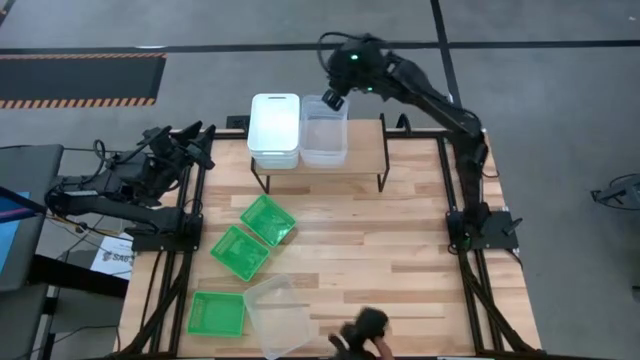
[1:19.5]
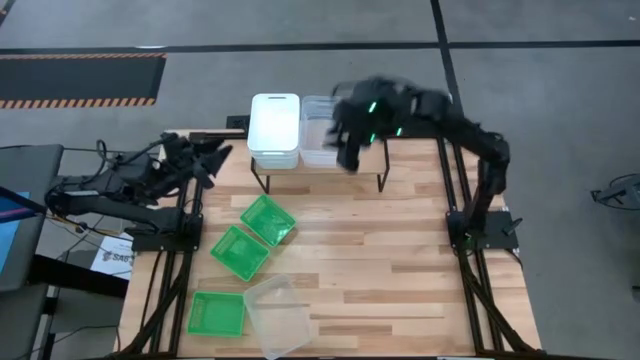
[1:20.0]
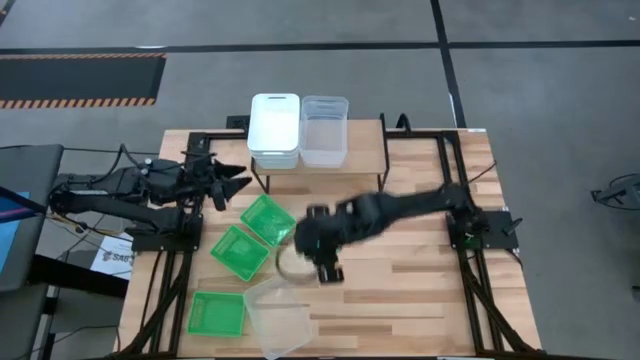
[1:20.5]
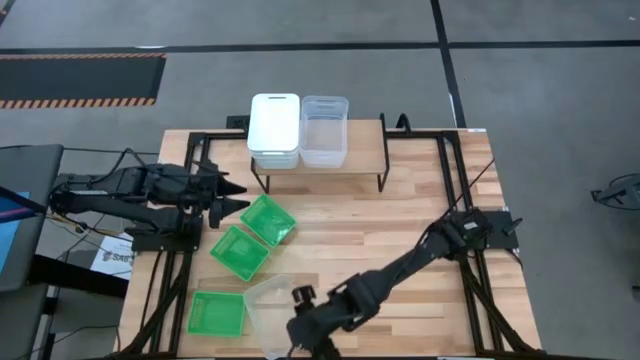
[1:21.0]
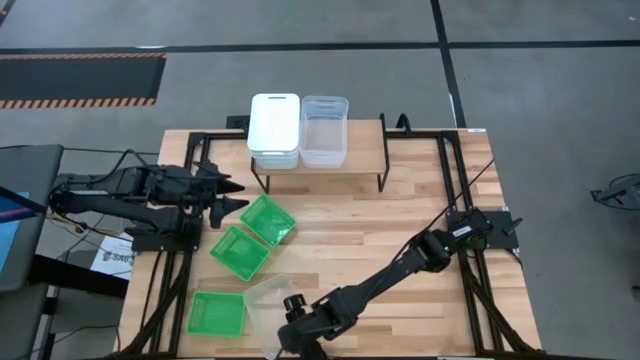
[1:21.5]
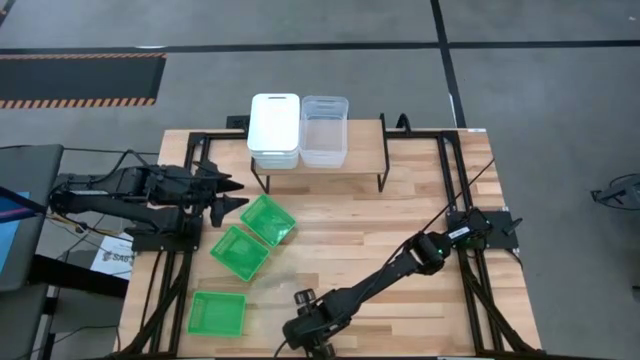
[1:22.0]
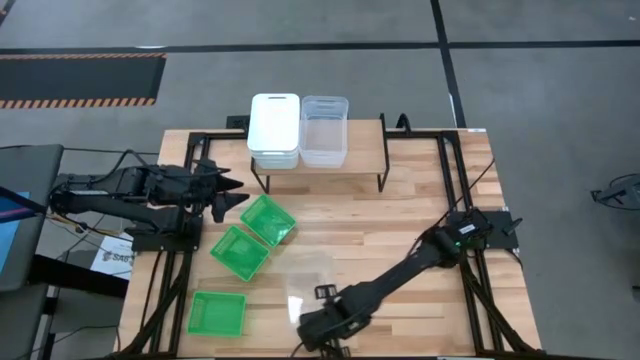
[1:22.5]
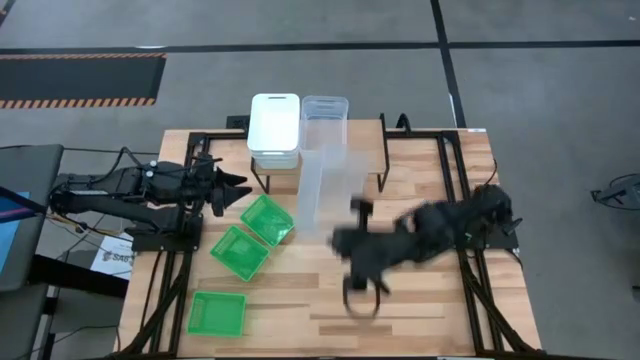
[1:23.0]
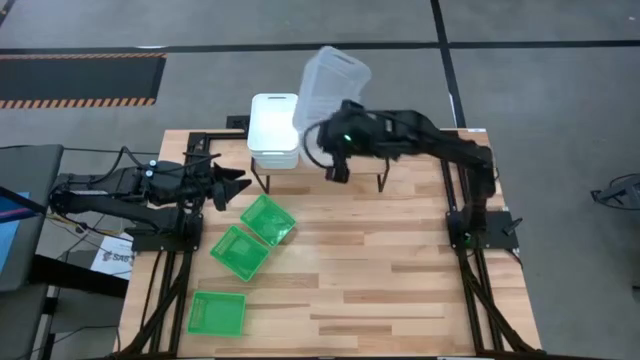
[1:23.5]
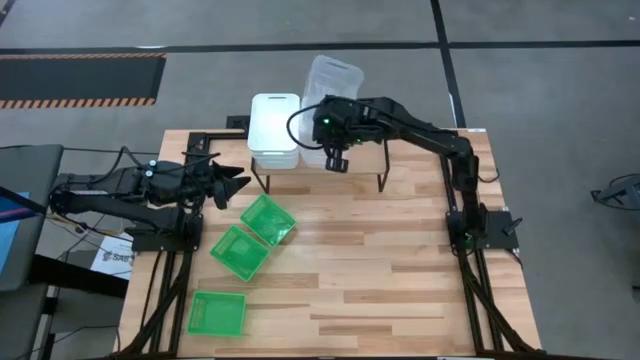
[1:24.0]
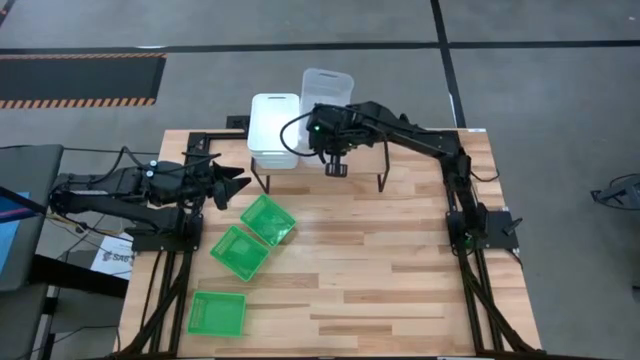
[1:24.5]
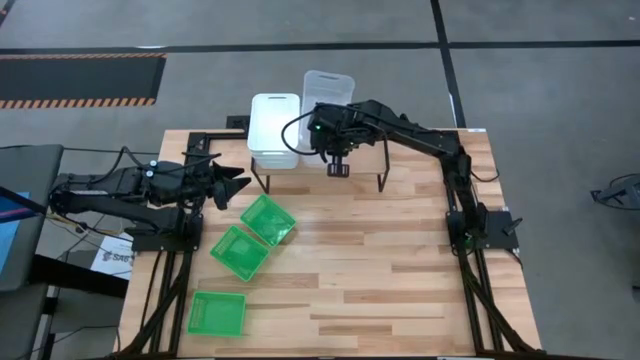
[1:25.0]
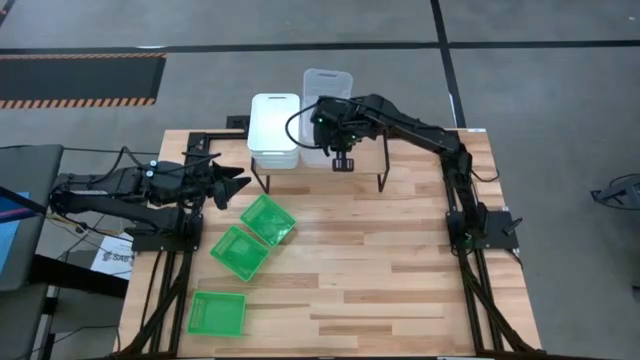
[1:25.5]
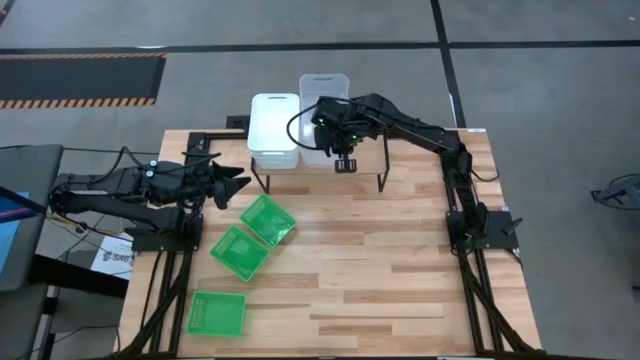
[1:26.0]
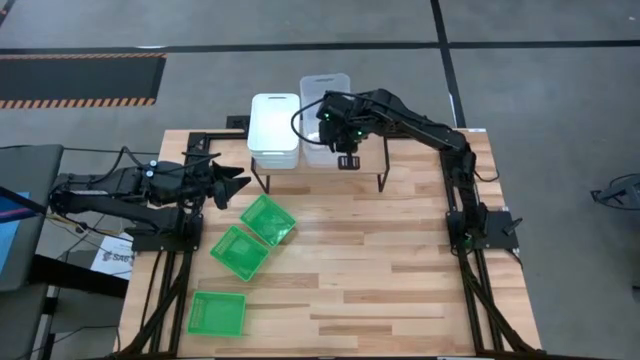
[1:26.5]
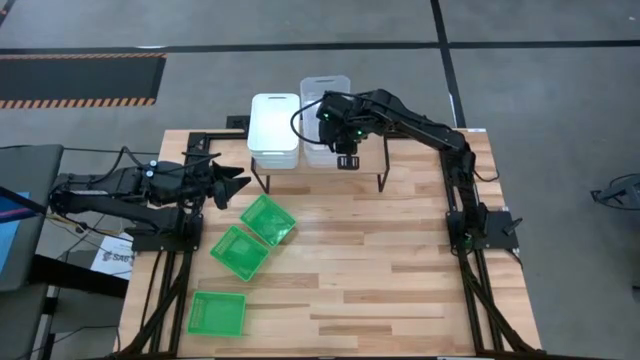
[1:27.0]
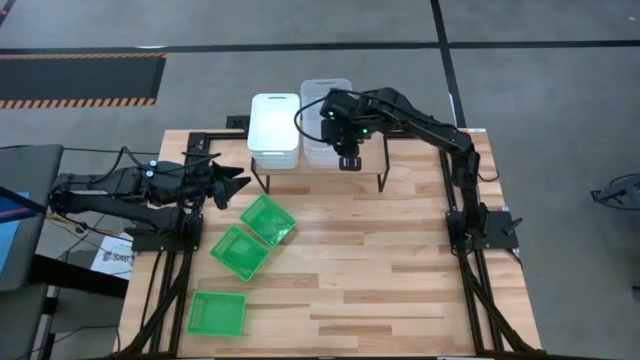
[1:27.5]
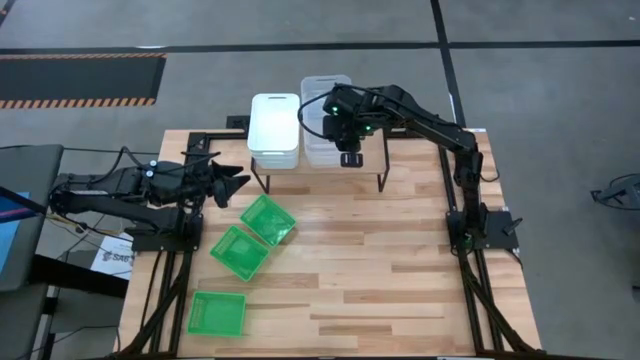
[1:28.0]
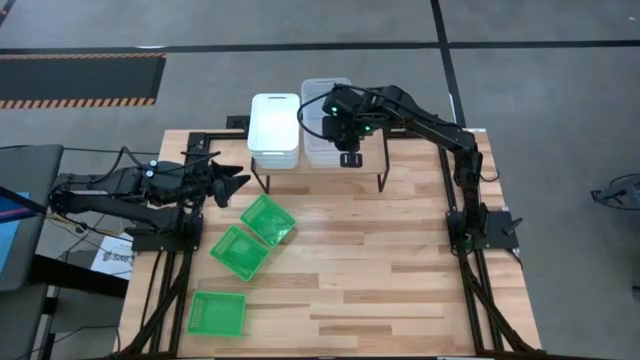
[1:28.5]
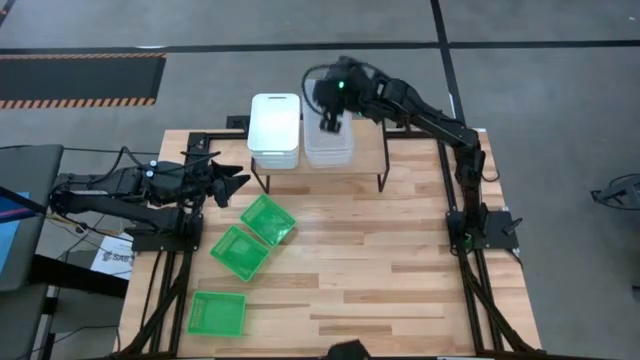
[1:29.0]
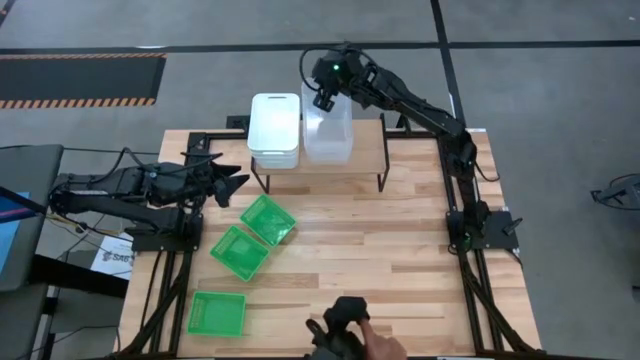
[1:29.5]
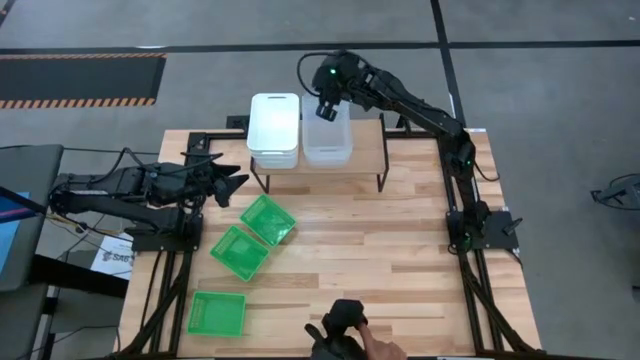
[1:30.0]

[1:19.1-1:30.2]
Task: Stack baskets on shelf by color
Stack the transparent bin on the transparent bin on the shelf

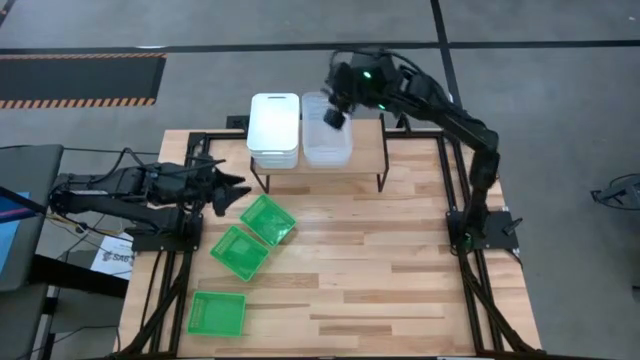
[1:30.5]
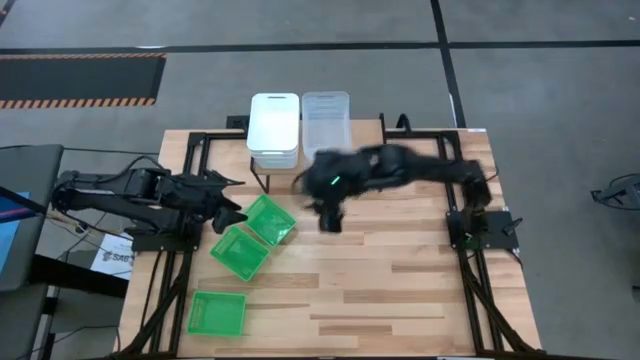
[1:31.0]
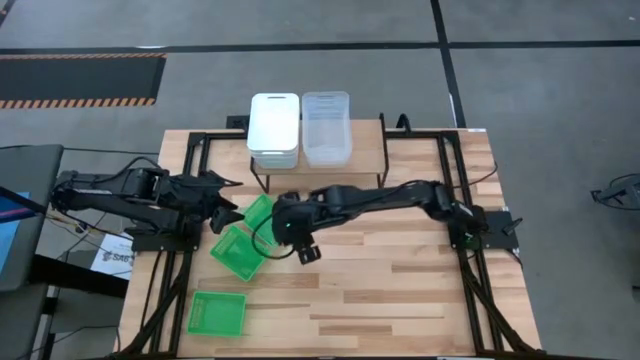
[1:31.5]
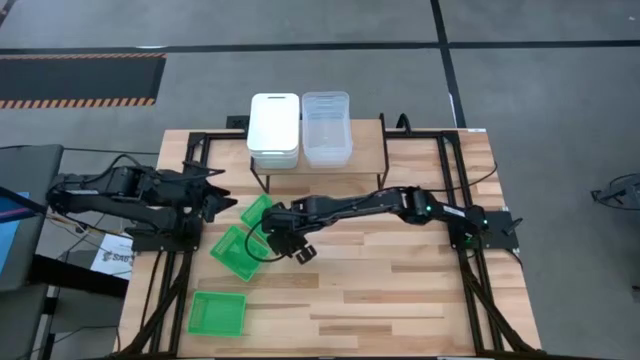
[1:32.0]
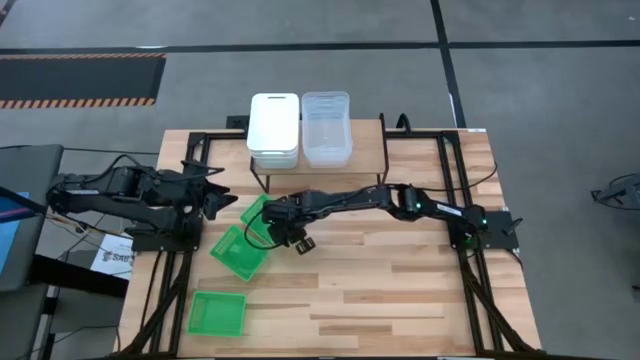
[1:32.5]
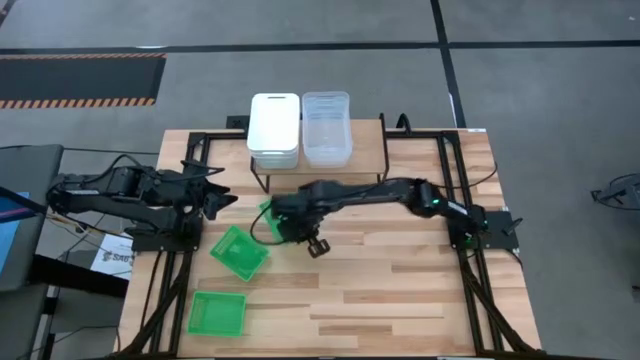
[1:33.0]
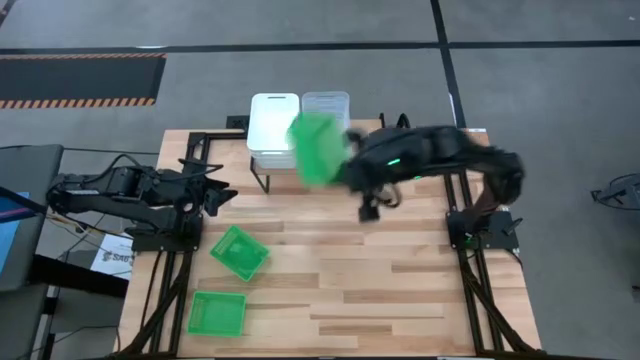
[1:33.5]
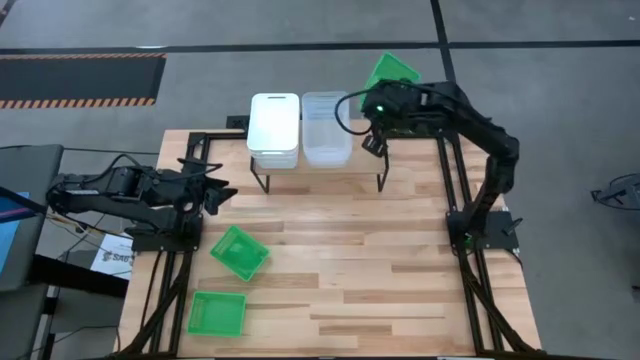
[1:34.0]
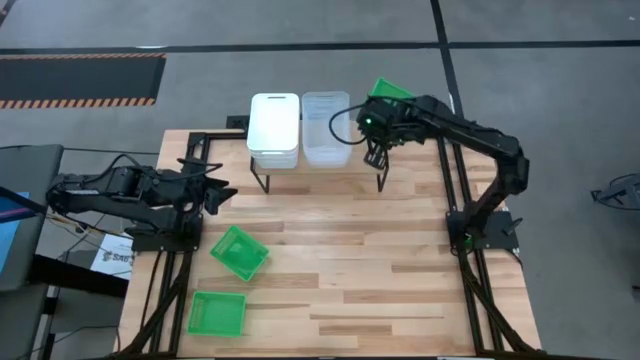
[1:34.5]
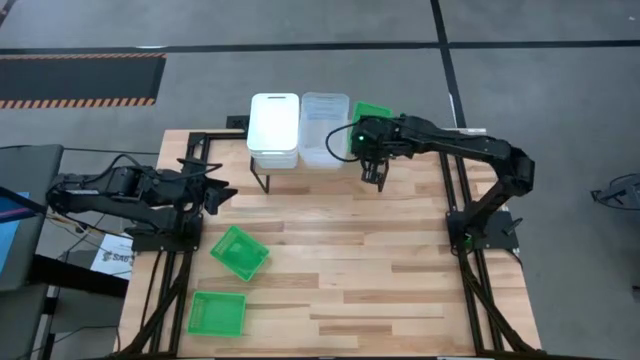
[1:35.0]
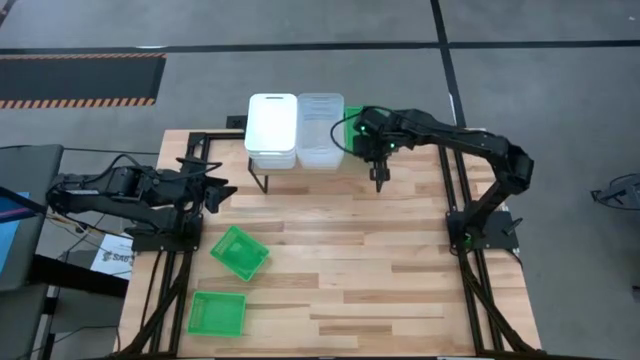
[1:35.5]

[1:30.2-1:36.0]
Put the top green bin on the shelf

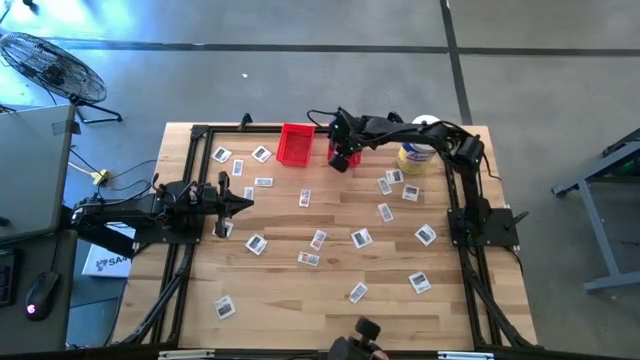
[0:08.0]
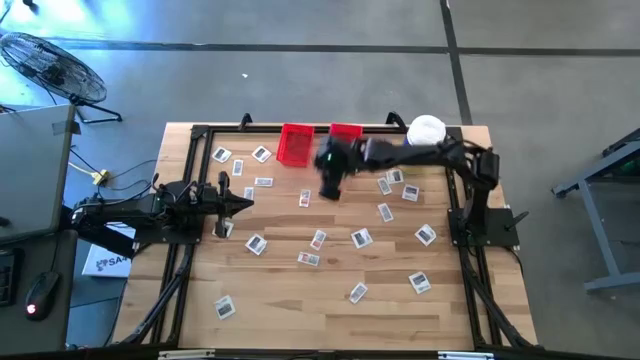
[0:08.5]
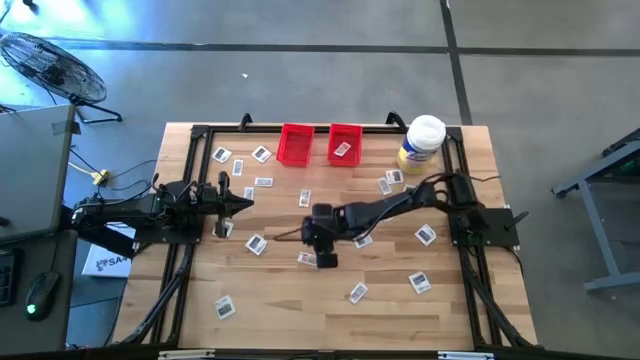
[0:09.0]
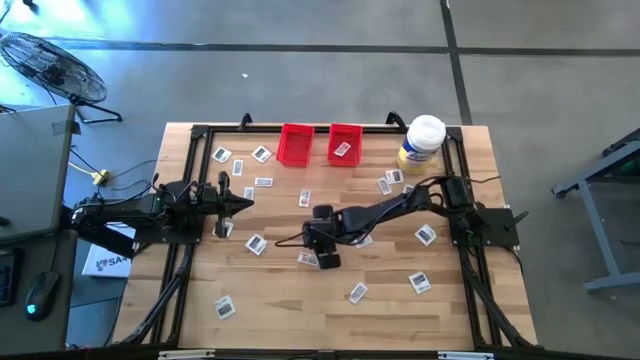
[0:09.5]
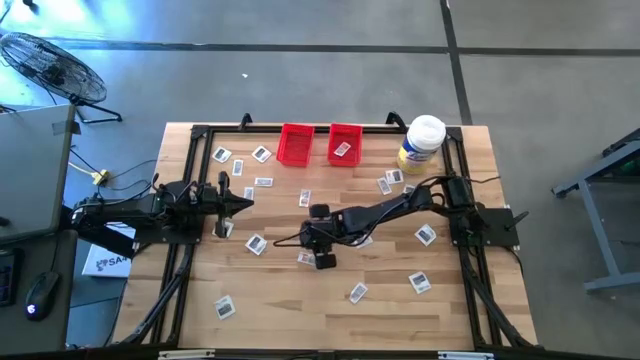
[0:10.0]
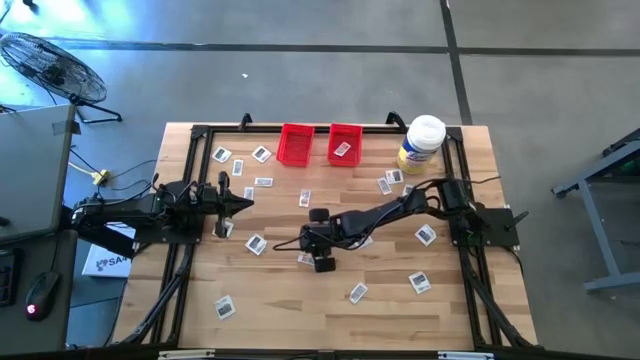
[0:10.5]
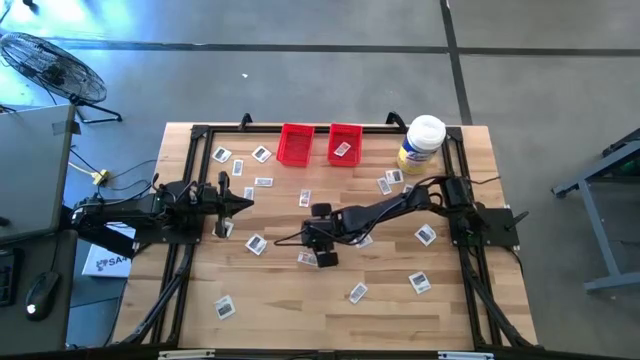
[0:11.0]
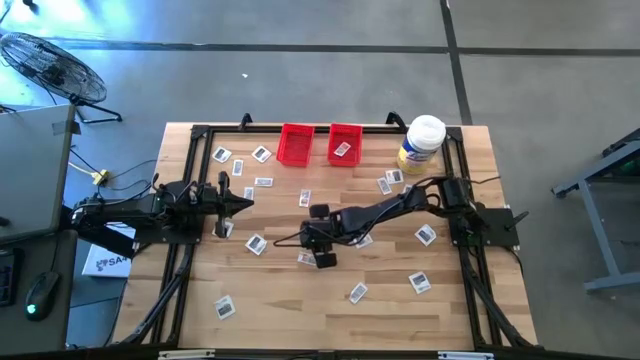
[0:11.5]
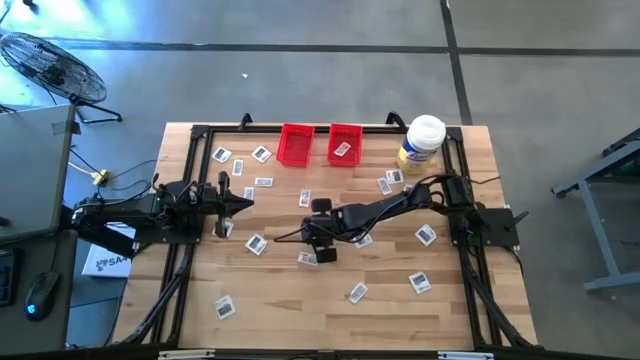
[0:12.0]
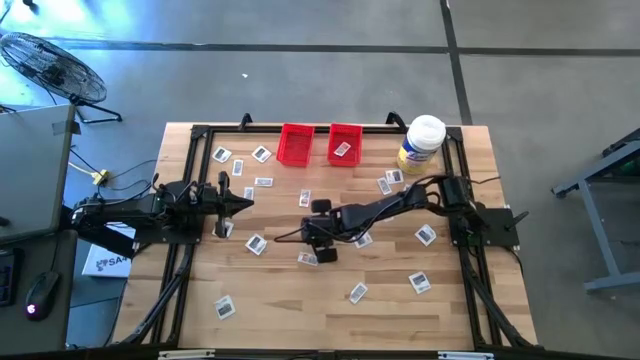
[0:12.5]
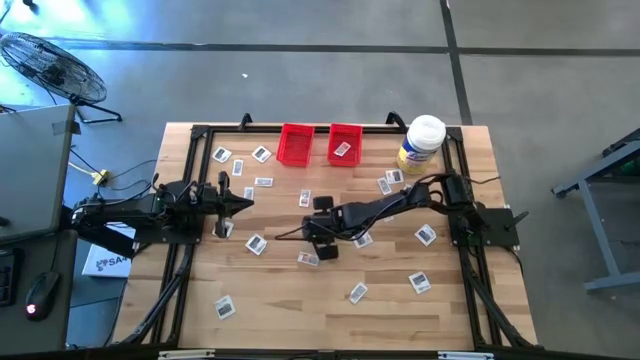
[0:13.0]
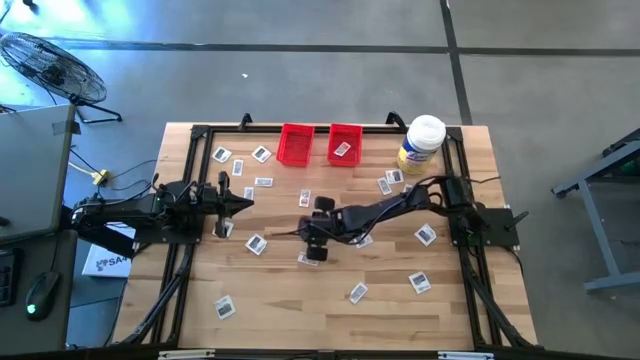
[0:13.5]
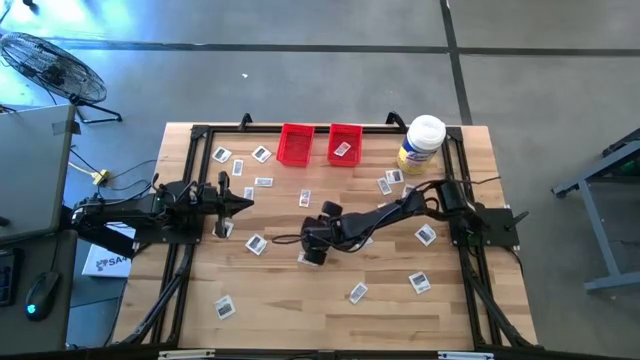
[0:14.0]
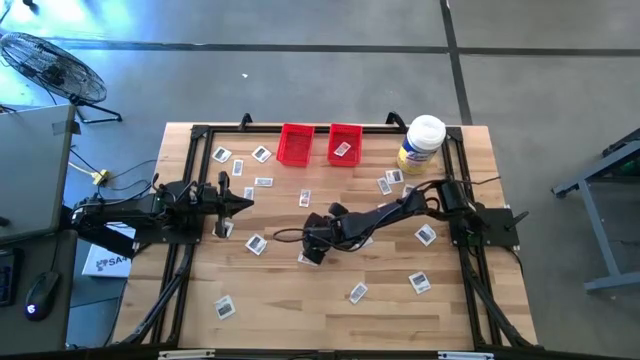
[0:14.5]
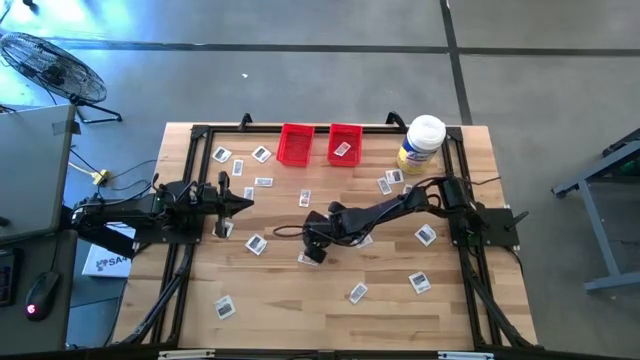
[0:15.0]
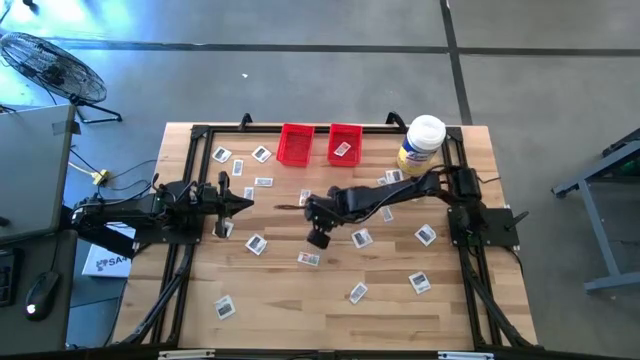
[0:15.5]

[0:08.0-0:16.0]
Task: Pick & Place First Aid Supplies
Put the ointment pack into the right red bin
